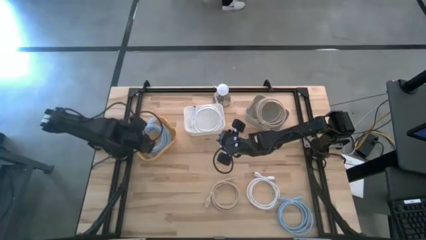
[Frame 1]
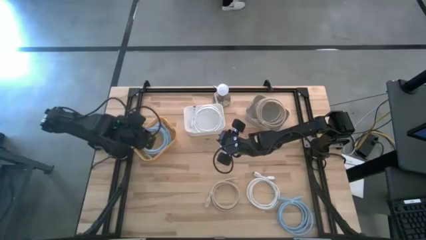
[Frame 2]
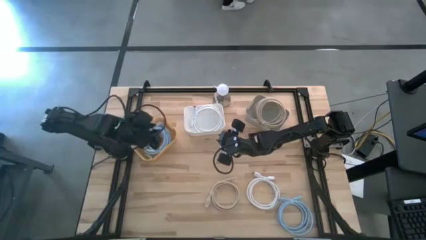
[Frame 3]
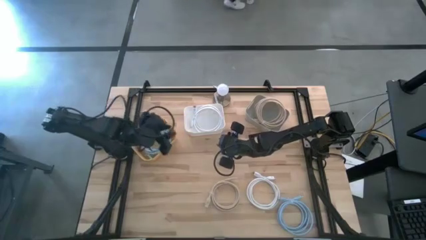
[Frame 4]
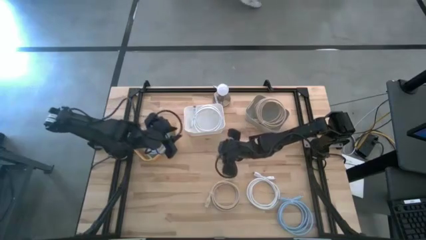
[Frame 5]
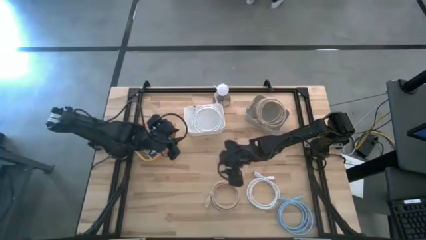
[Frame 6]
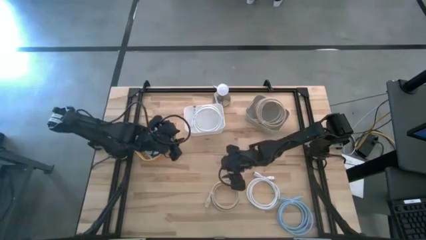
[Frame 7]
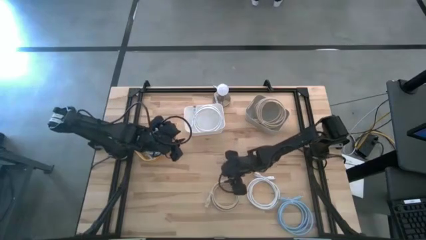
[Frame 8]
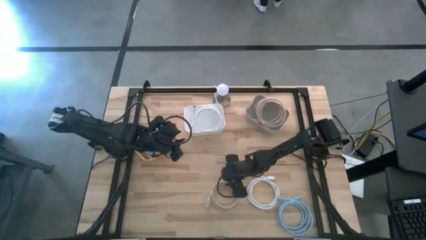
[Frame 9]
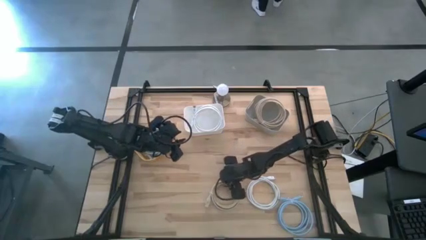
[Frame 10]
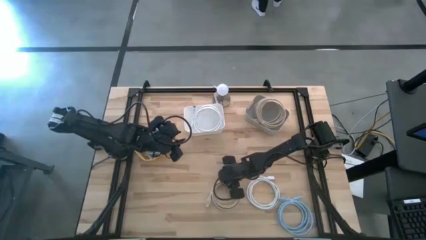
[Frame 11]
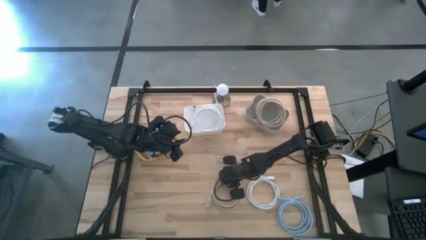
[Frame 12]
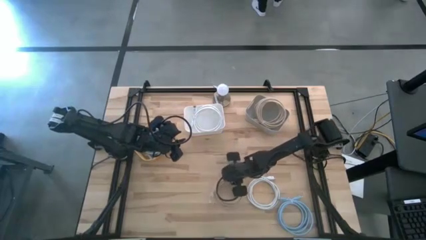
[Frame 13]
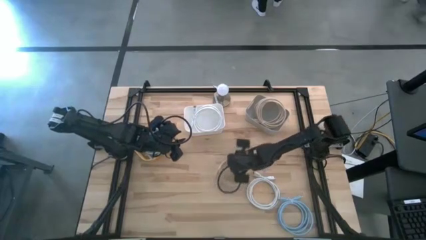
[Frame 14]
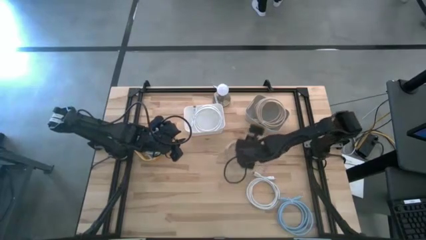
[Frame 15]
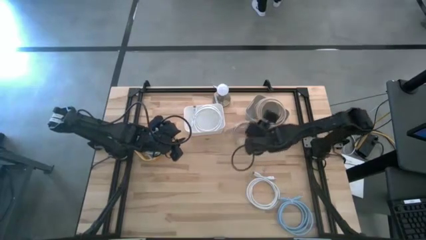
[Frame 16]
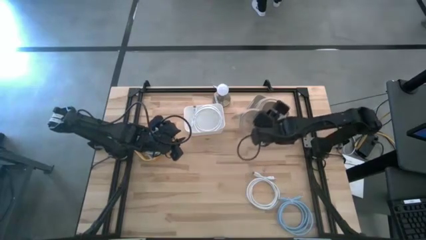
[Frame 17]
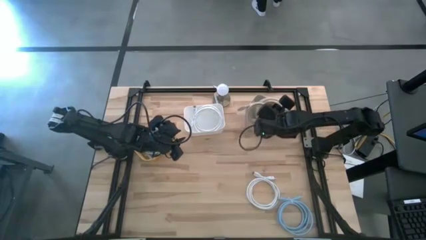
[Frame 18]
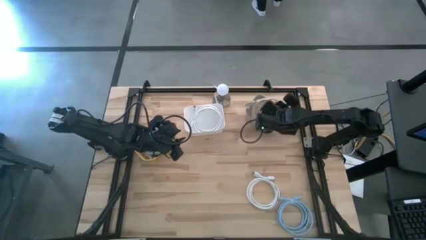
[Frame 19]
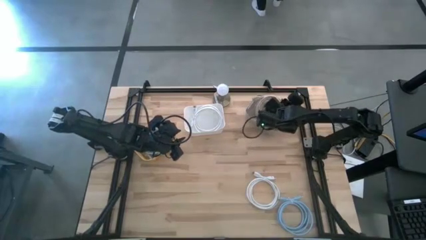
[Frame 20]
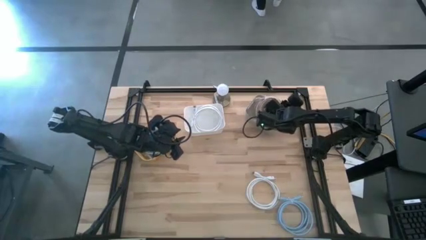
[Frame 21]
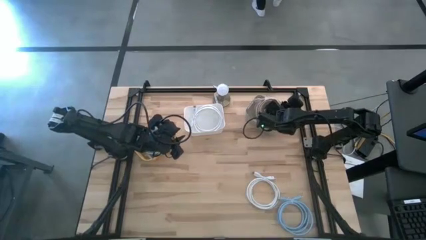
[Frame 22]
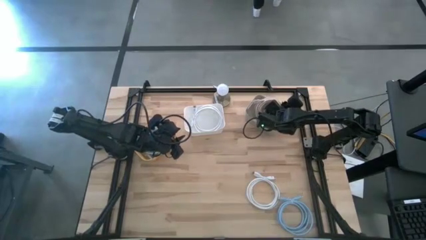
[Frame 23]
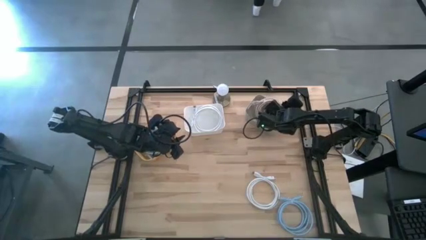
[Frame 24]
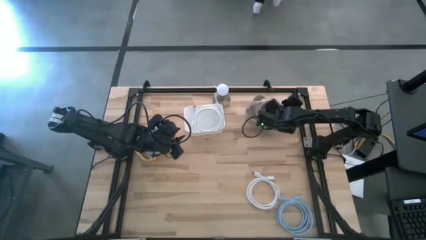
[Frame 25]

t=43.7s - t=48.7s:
Task: Sort HDMI cables
Put the brown hdmi cable into the gray bin

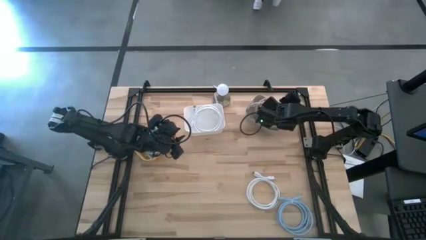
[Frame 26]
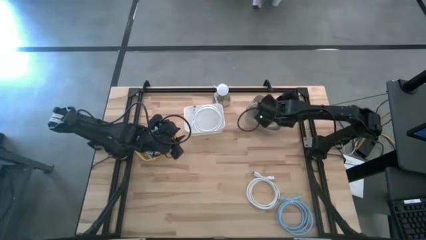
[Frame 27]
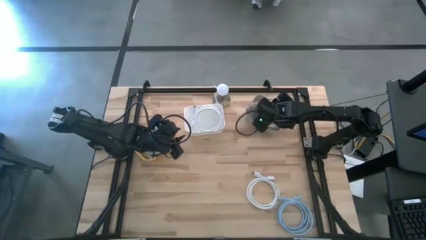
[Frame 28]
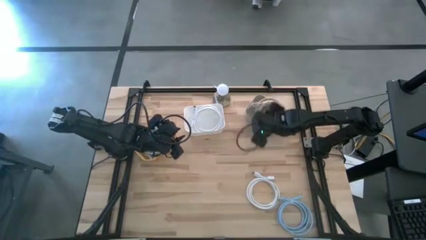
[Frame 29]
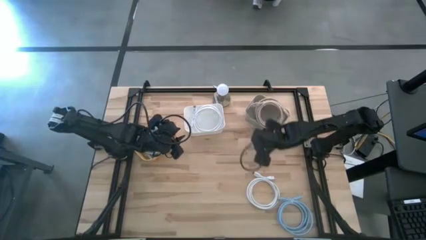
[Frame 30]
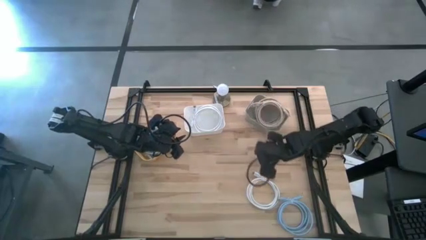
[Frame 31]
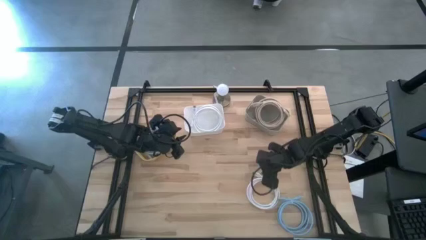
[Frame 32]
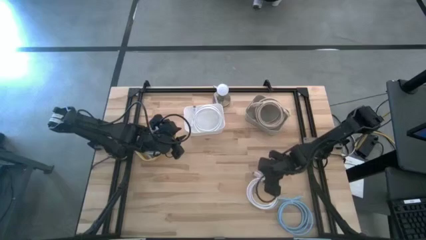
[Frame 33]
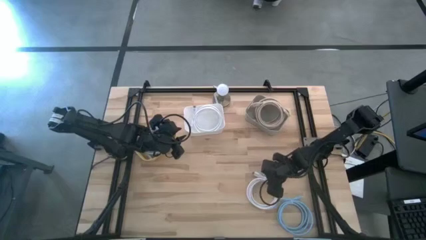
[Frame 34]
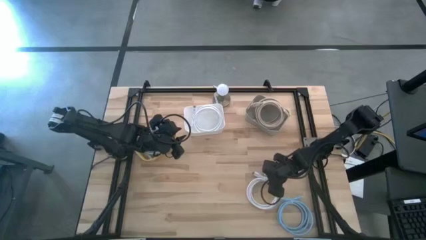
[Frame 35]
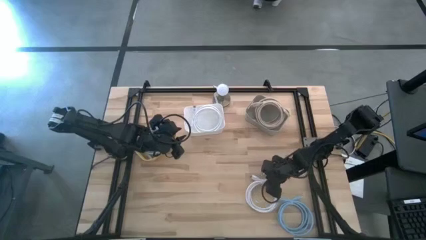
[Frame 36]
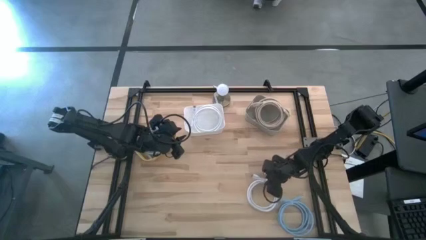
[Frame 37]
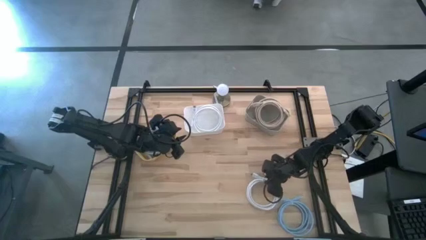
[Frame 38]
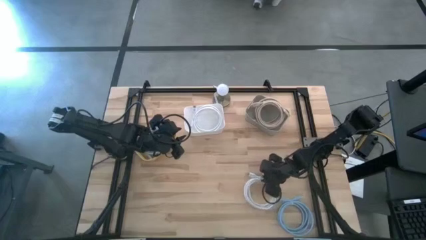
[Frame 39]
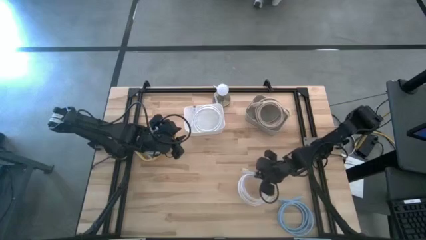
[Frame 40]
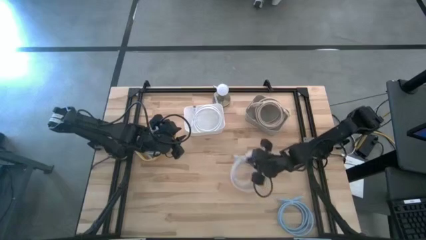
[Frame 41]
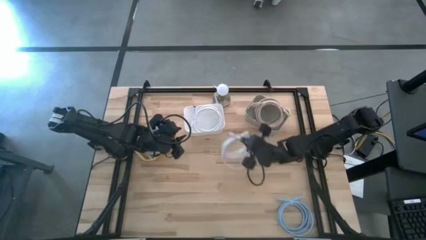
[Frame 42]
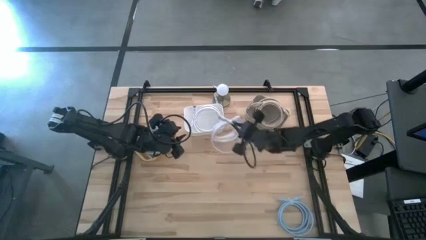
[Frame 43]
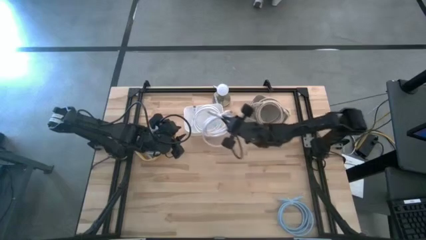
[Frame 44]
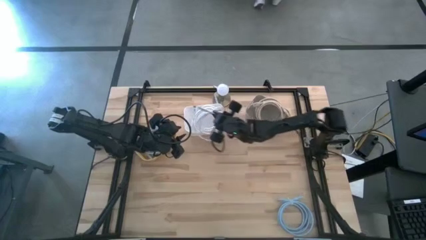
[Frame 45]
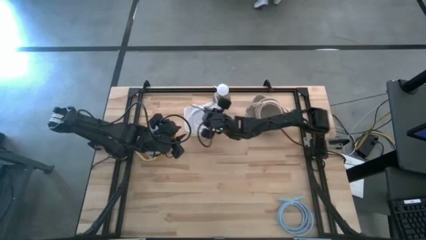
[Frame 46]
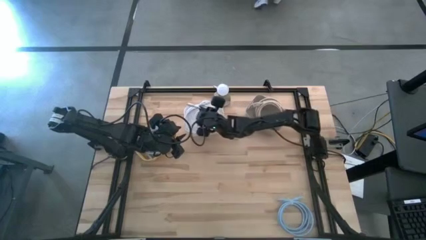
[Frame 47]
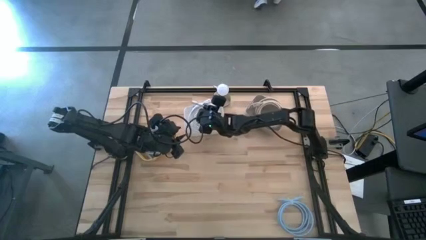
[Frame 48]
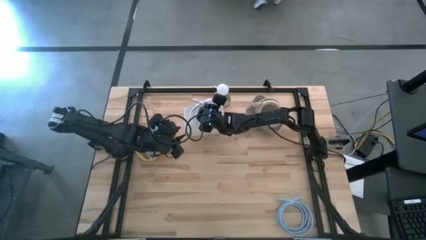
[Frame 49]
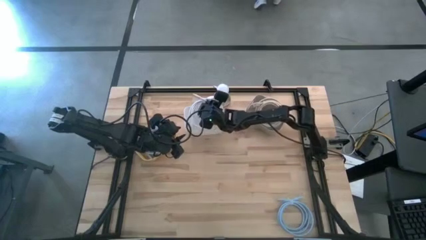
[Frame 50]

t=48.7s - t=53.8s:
Put the white hdmi cable into the white bin

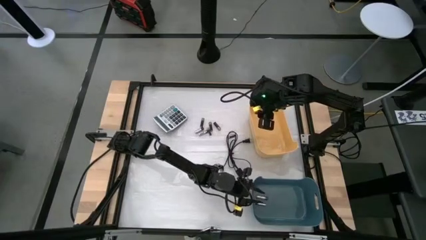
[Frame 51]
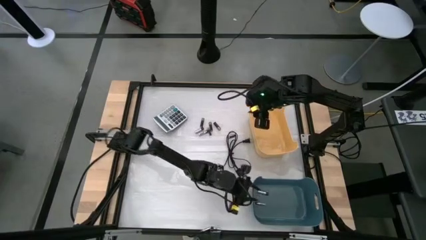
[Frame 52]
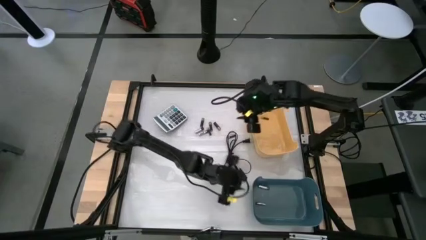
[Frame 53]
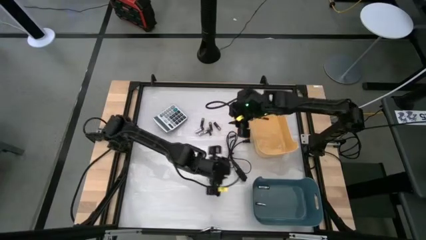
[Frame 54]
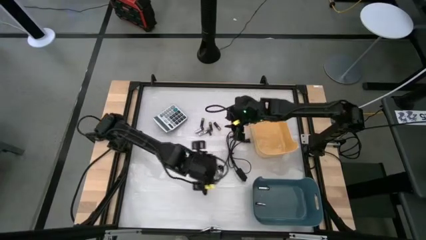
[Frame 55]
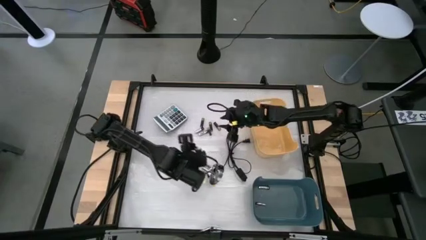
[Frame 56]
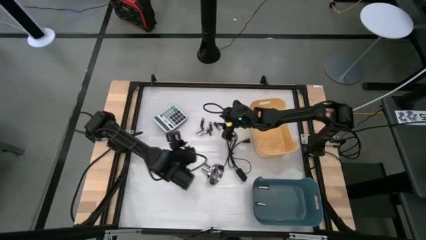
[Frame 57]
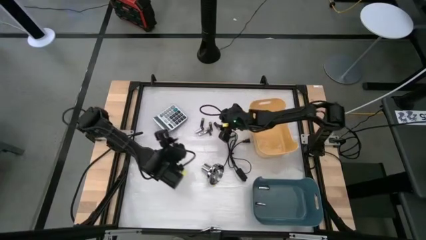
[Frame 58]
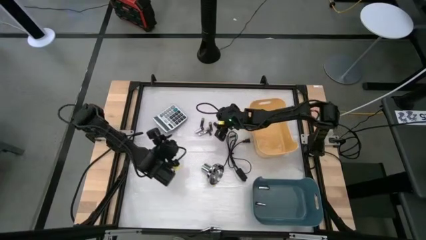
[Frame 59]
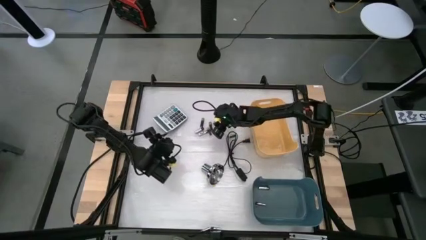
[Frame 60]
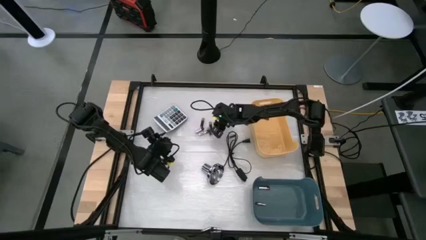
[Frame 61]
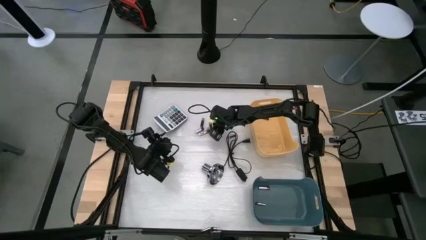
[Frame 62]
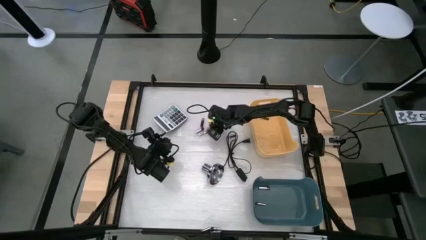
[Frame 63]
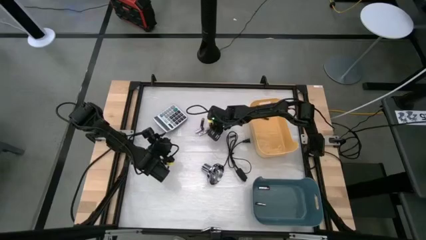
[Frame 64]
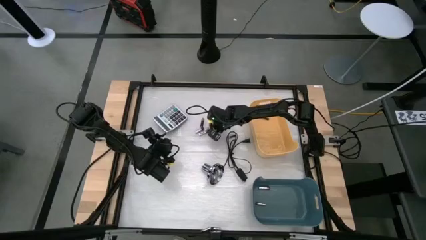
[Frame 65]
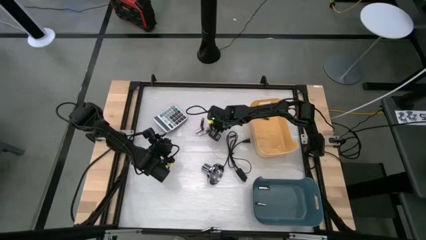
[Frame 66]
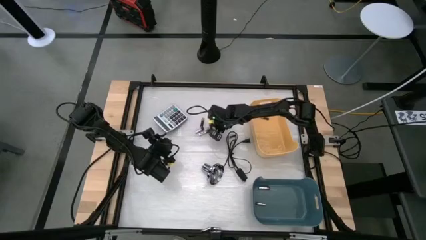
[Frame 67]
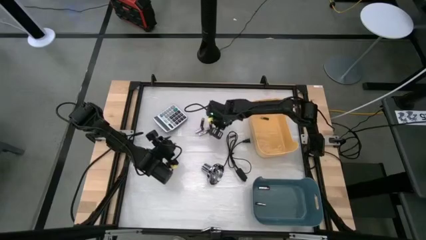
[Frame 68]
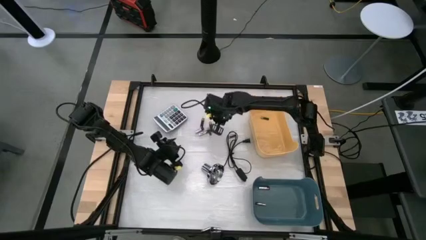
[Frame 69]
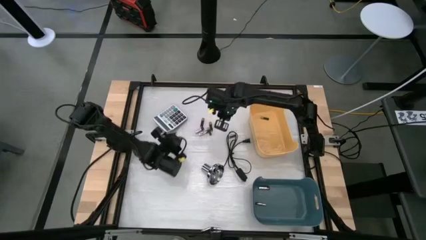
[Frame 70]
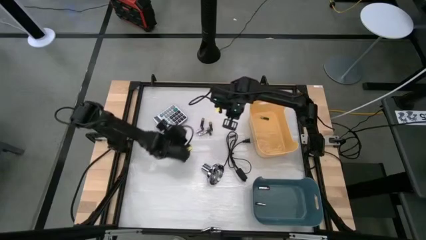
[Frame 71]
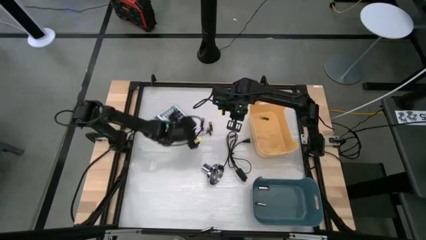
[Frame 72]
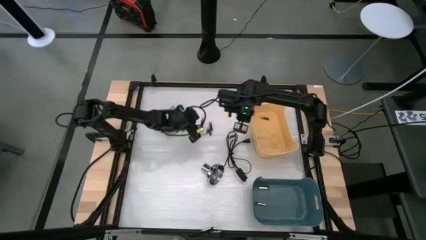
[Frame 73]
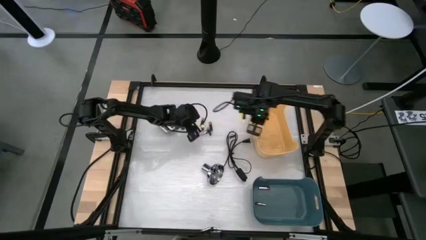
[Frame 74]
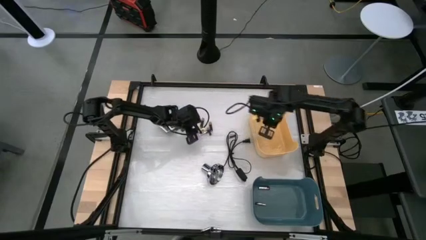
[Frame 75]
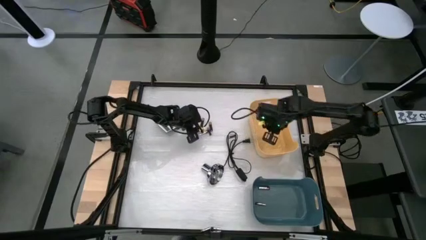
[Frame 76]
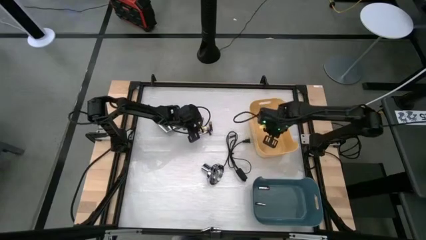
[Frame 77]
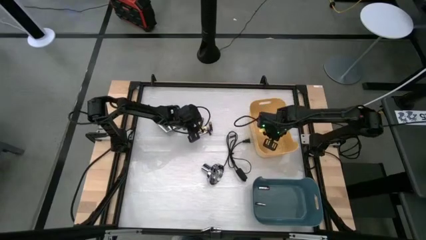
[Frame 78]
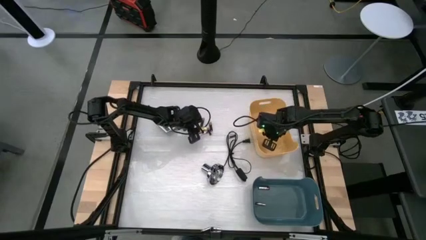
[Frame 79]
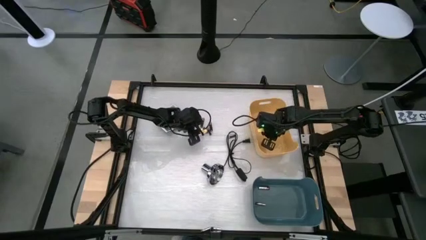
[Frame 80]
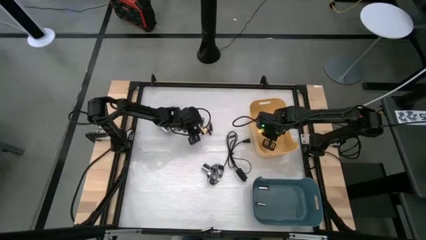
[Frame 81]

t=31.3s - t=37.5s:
Task: Sort batteries
Put the black battery into the yellow bin
